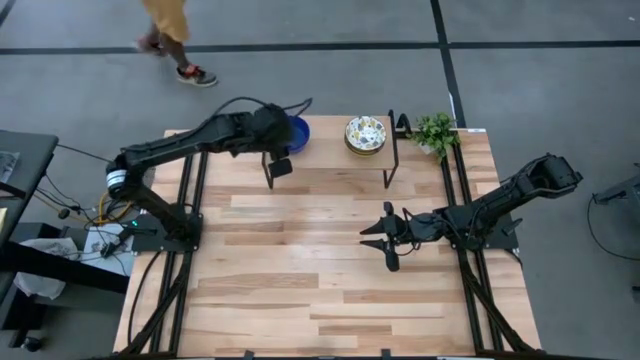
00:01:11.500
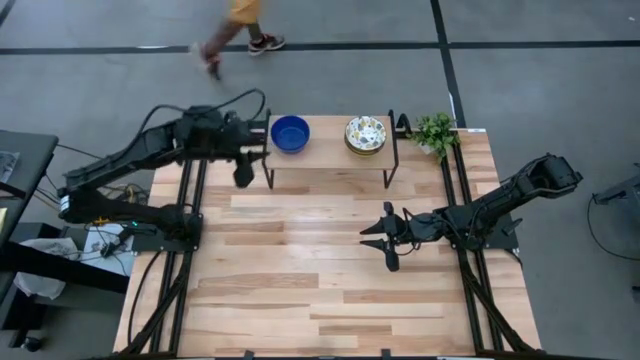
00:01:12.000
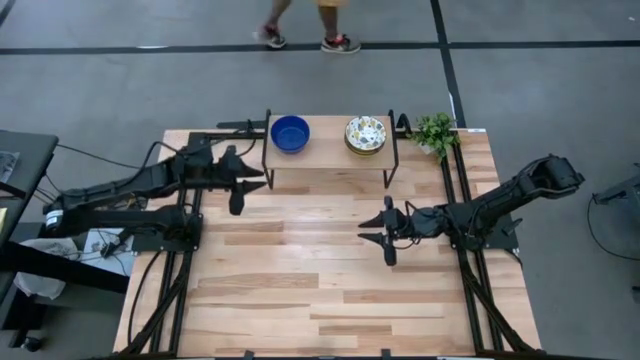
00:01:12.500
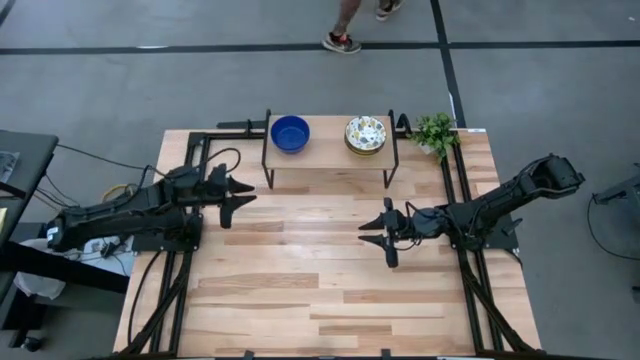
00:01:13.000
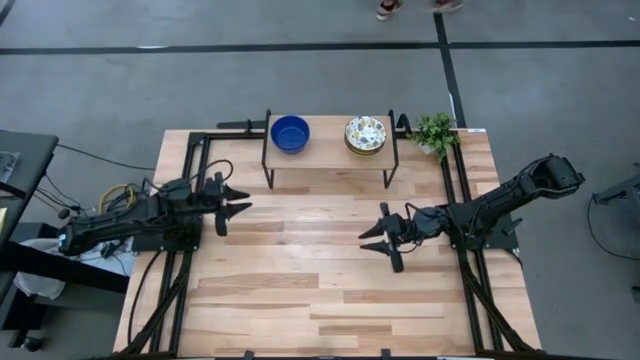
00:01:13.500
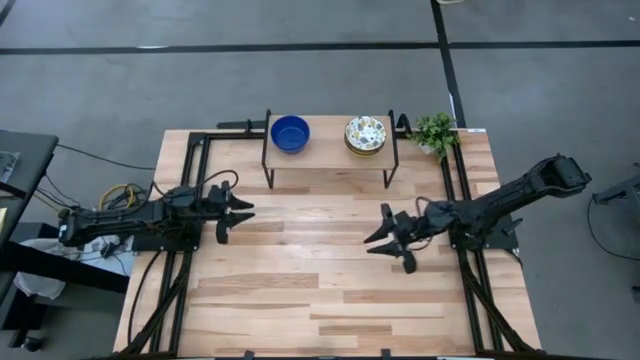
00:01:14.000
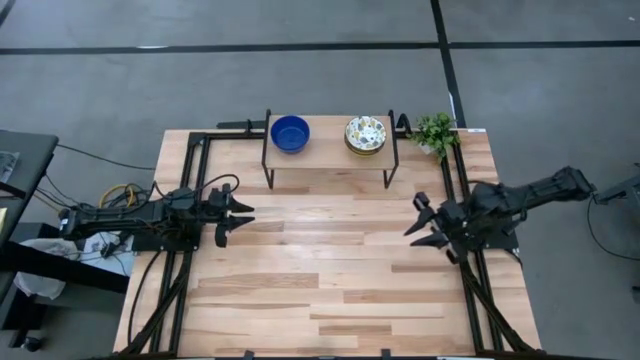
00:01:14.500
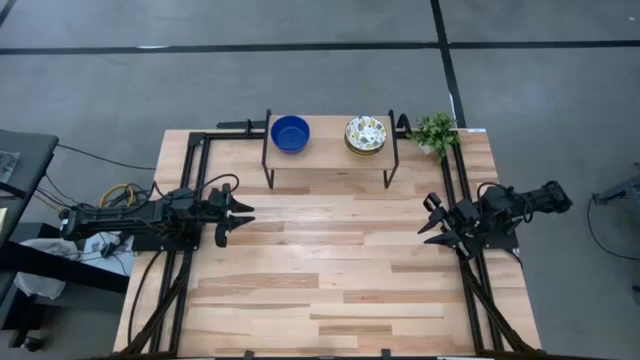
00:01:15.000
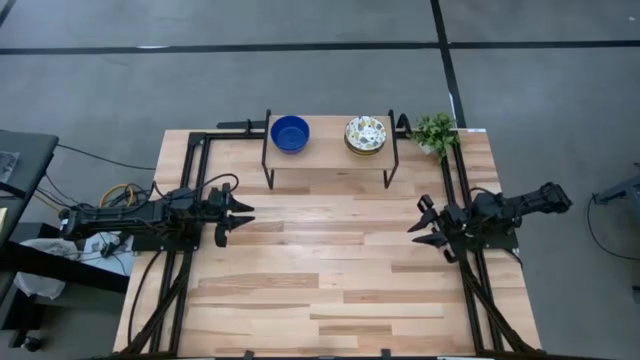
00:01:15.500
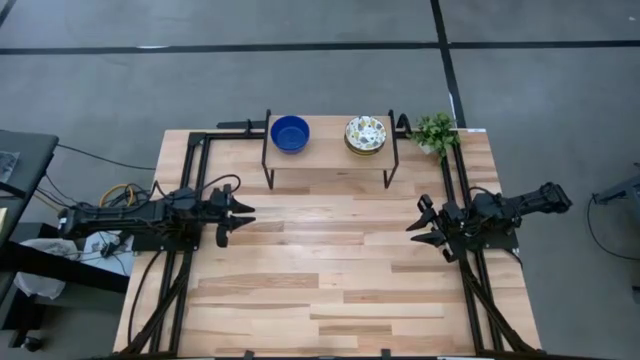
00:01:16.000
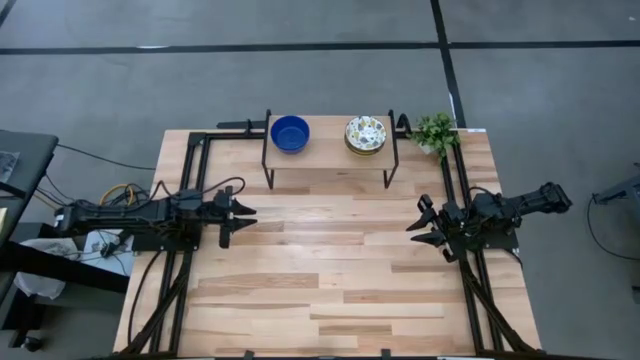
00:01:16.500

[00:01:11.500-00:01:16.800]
Task: Pick & Place Mini bowls
Return to Home Position

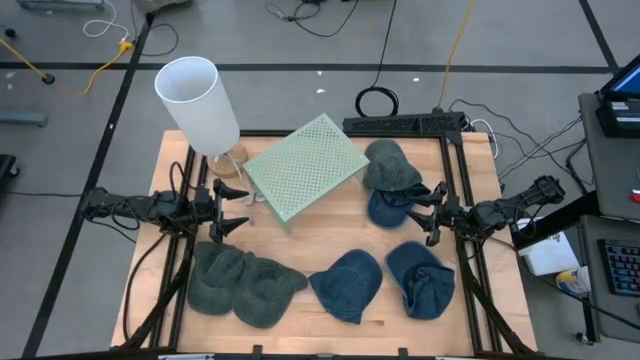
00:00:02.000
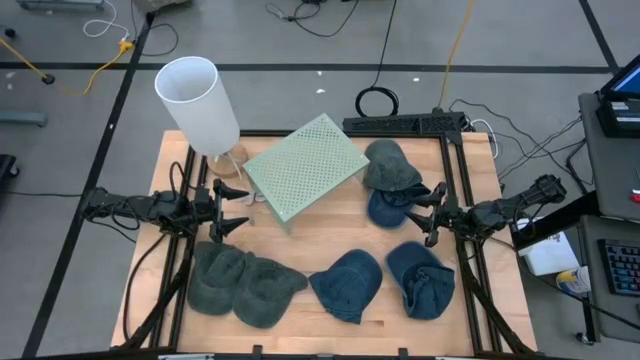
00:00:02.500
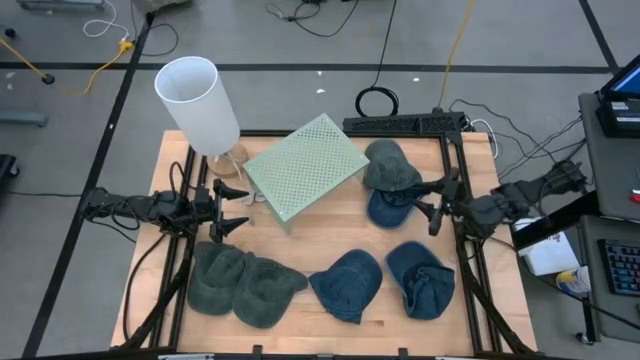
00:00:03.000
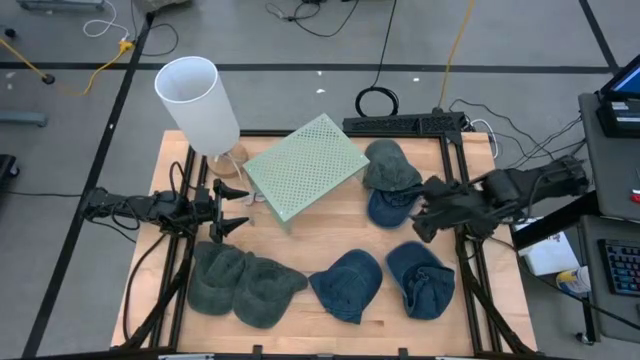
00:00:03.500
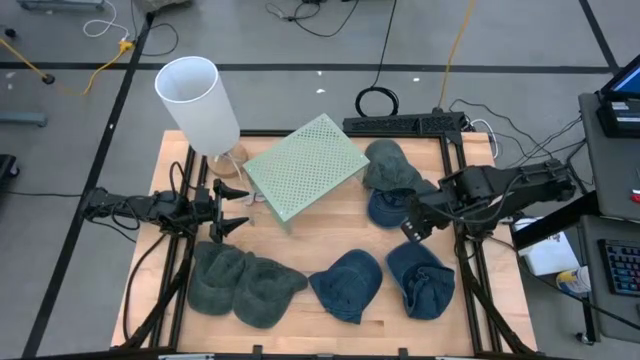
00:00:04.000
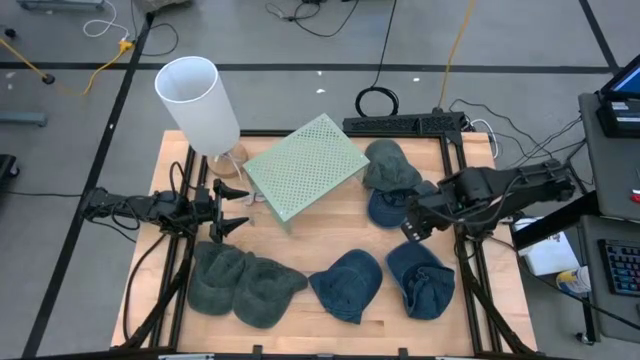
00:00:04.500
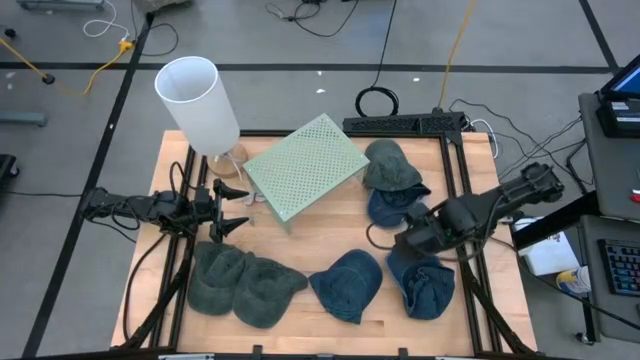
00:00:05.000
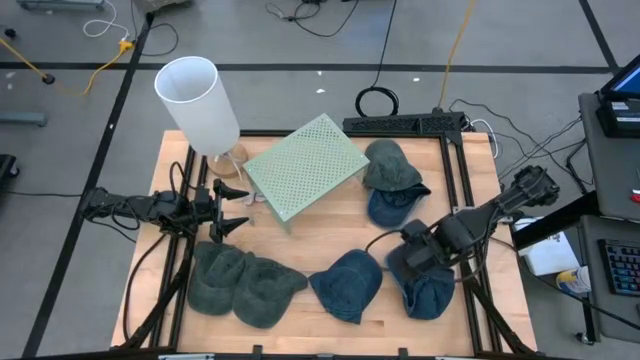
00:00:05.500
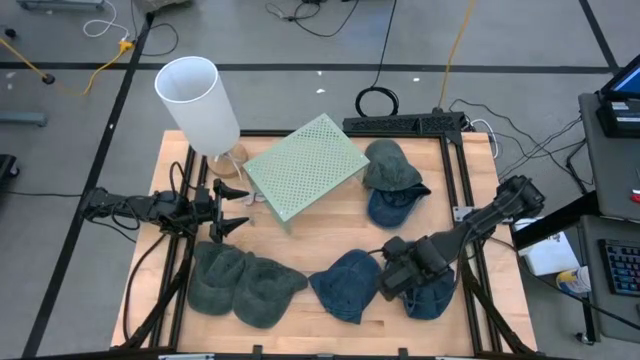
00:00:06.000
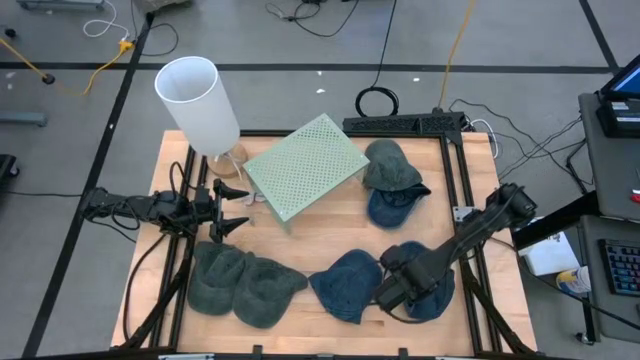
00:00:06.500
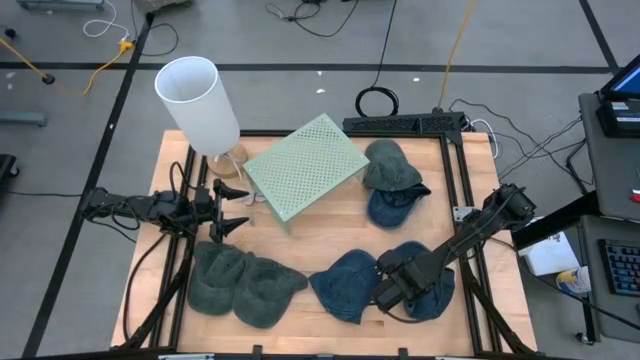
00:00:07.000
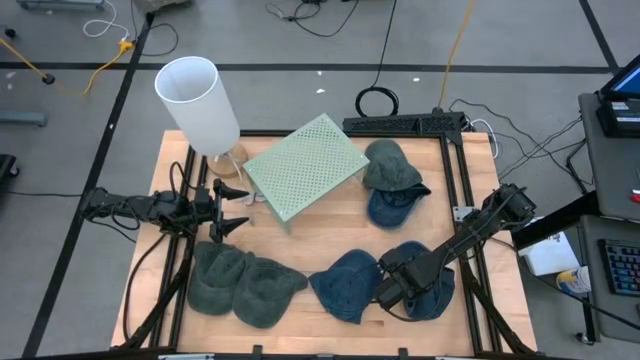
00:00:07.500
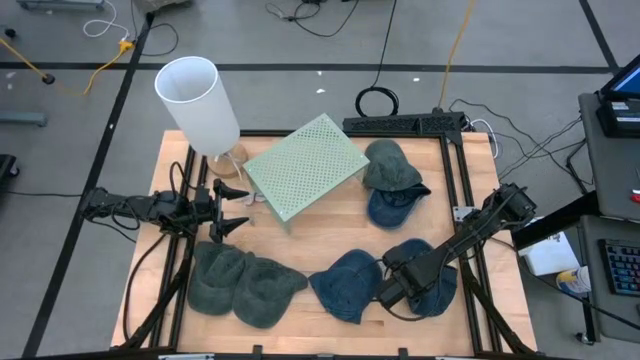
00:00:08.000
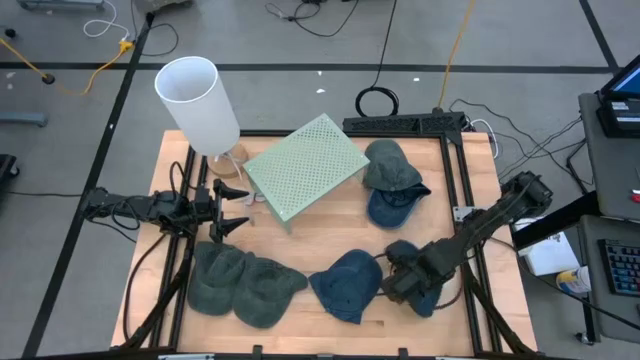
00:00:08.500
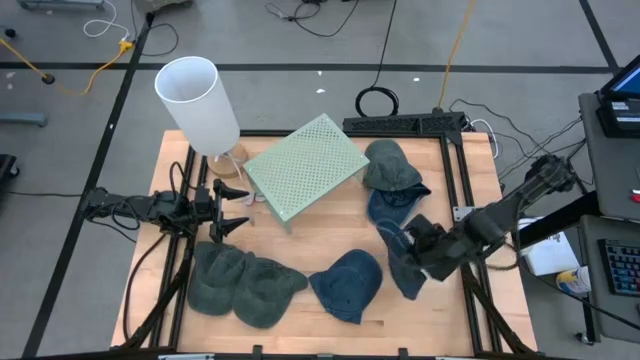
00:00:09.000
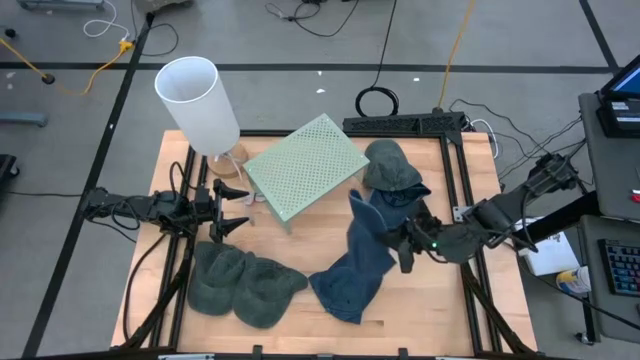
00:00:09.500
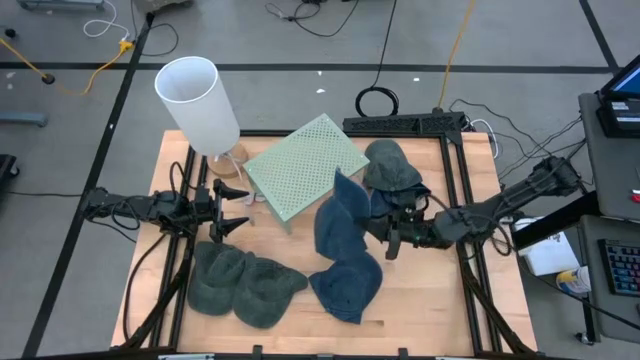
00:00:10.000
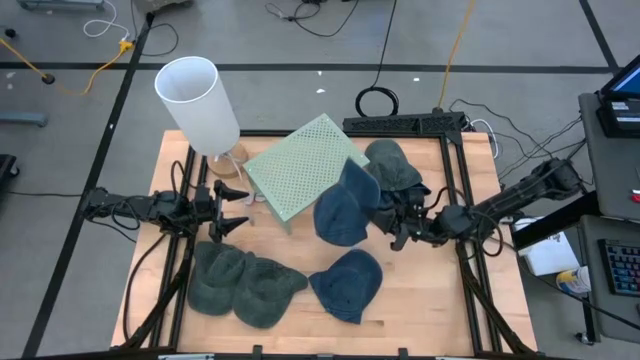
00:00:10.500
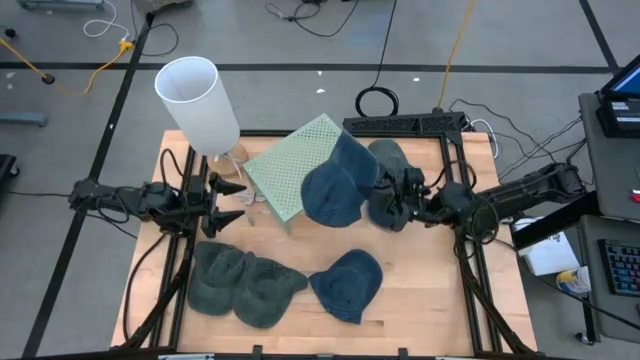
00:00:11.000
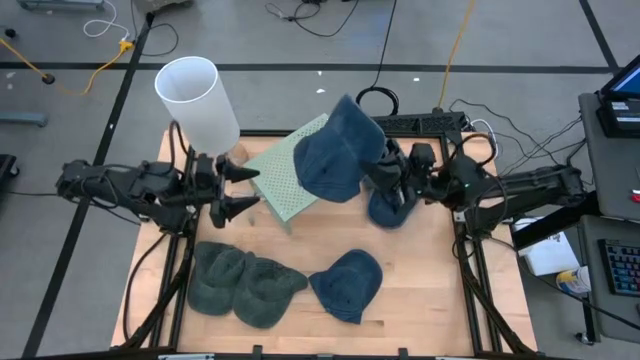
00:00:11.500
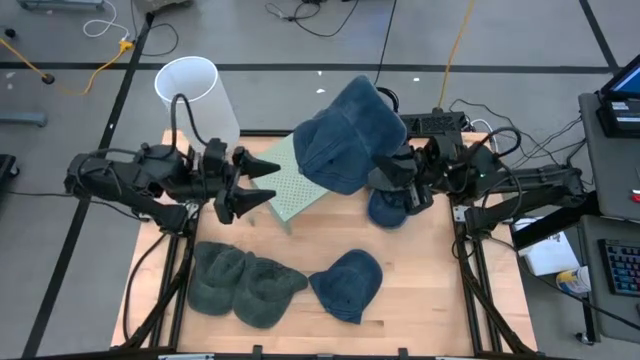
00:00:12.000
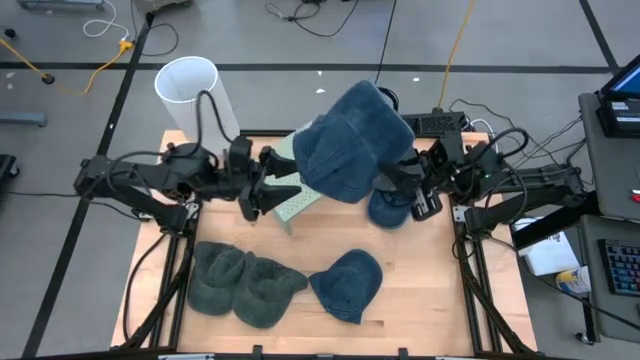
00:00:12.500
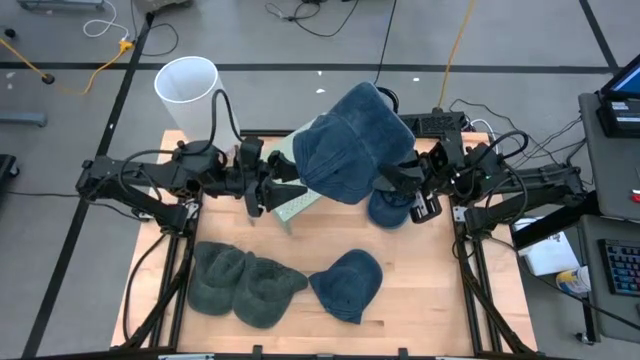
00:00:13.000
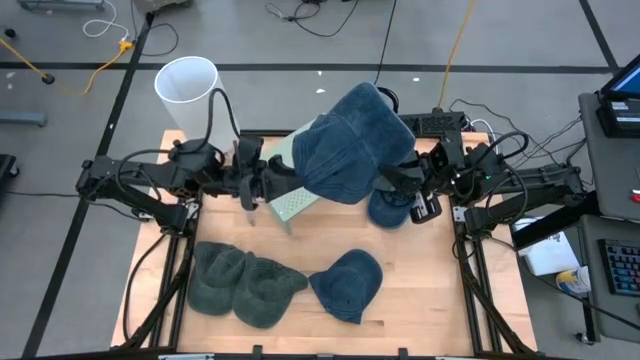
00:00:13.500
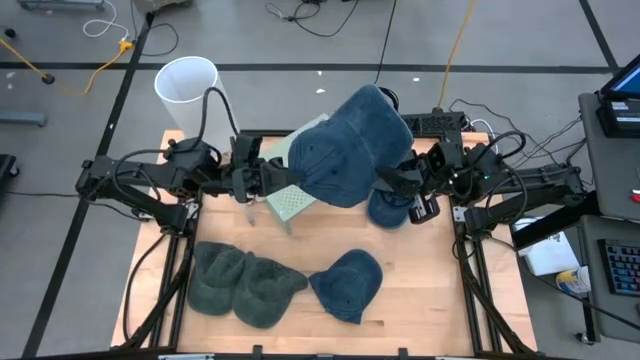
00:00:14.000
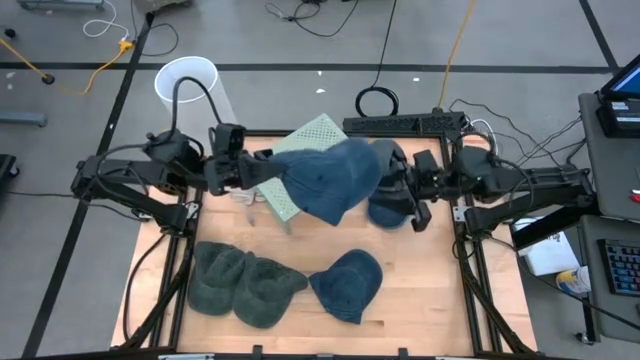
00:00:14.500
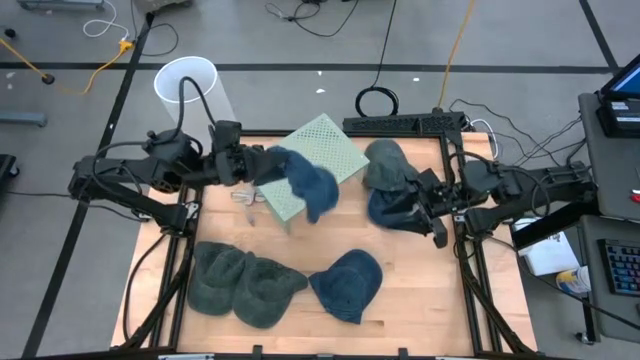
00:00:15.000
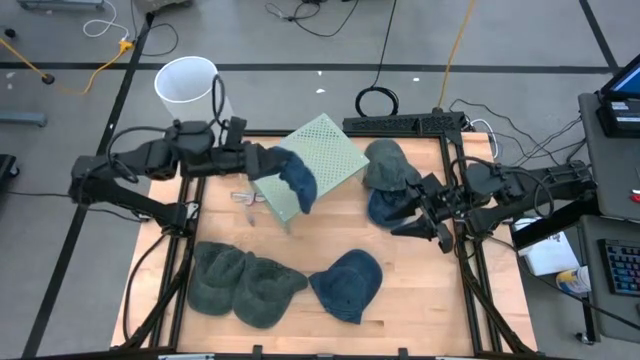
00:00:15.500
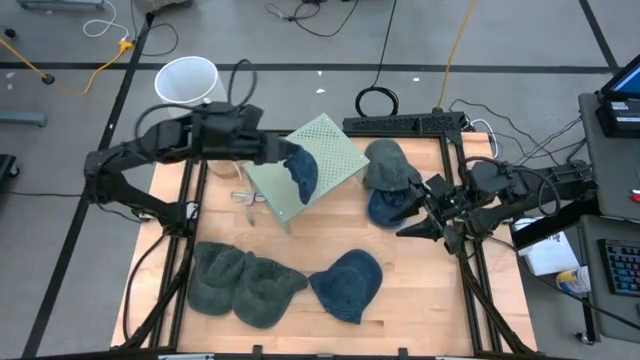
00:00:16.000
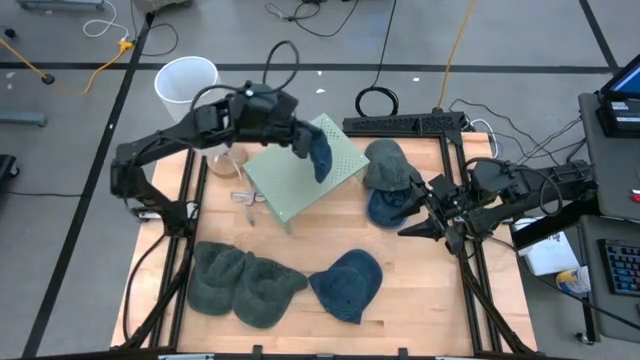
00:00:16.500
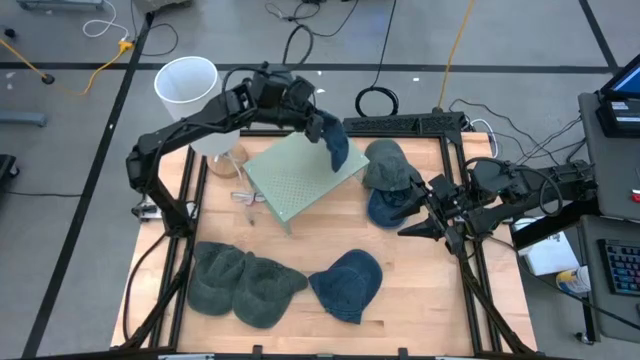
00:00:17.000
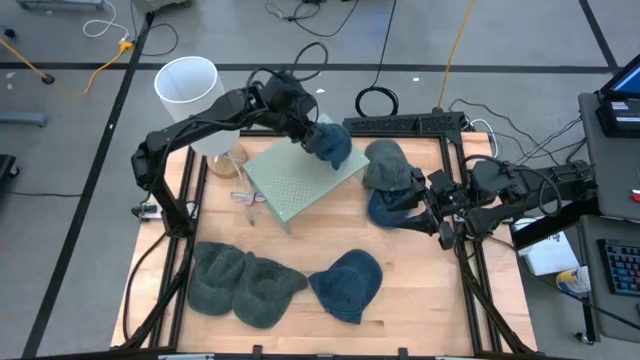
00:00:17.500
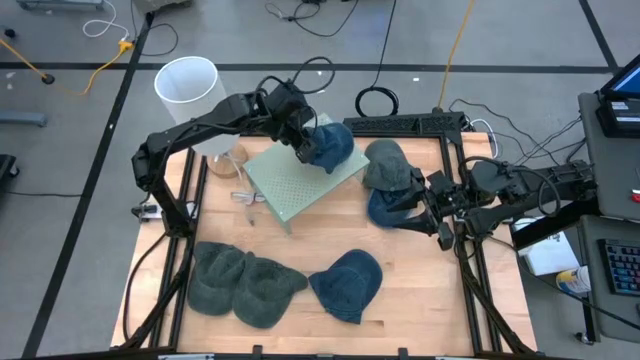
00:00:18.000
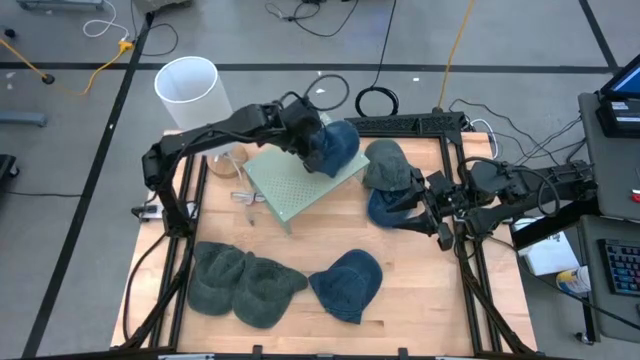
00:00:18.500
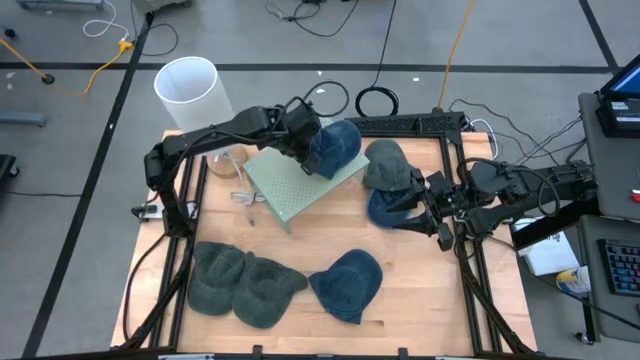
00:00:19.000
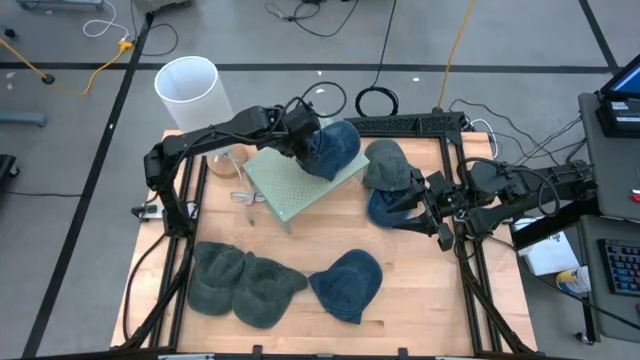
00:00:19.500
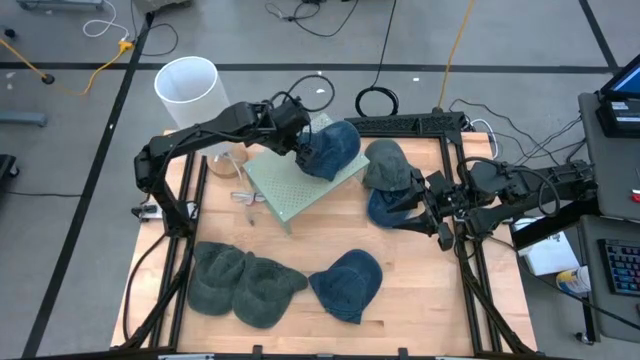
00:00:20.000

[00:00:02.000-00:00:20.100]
Task: Pick & Place hat
Put the bottom right blue cap on the shelf
